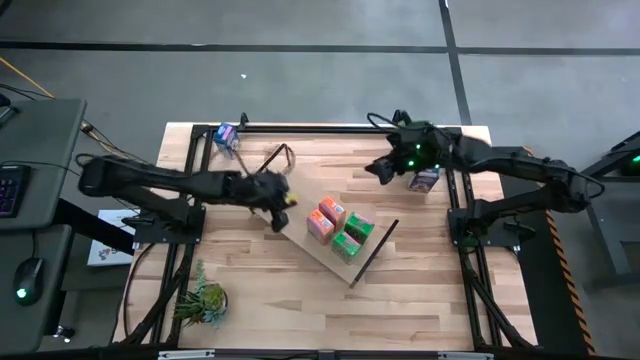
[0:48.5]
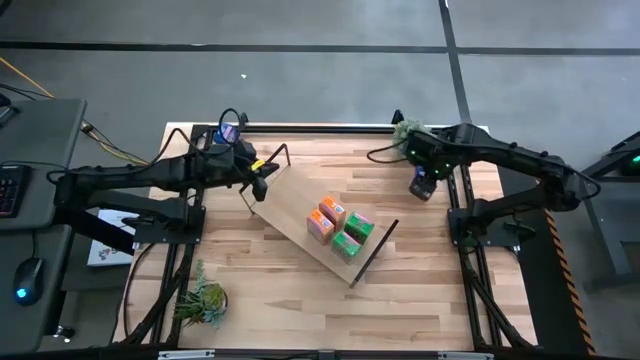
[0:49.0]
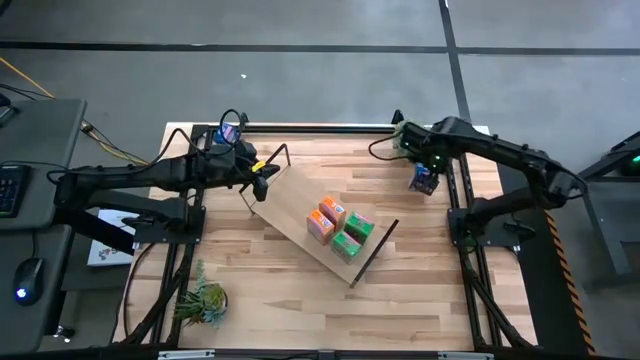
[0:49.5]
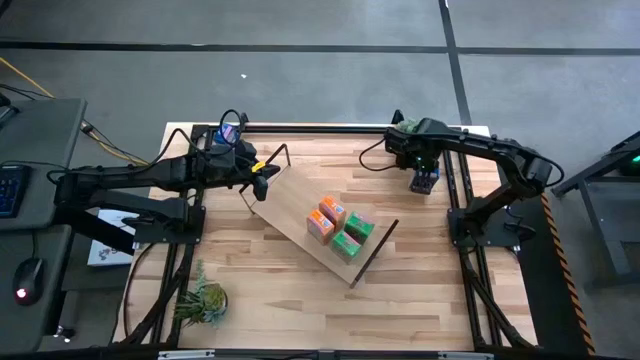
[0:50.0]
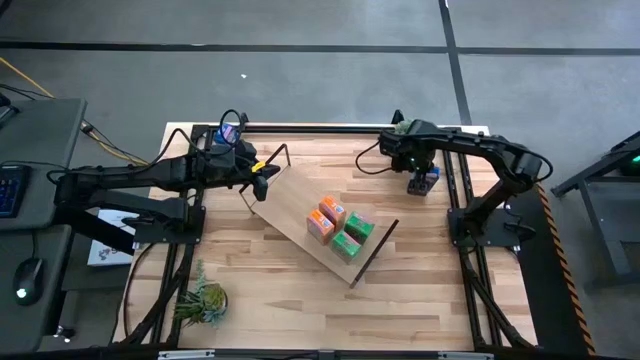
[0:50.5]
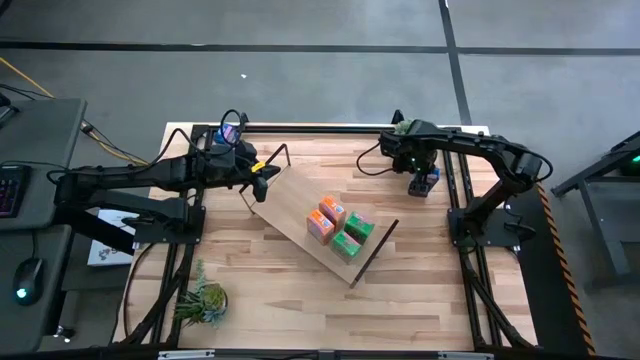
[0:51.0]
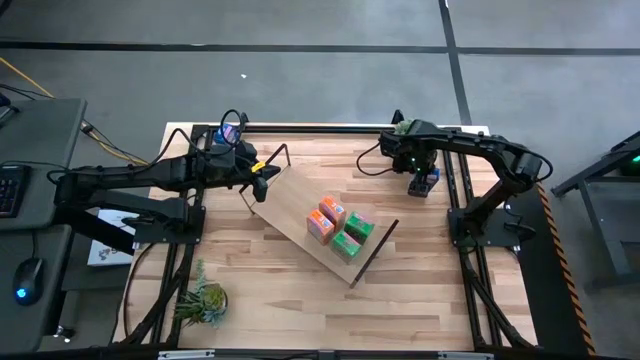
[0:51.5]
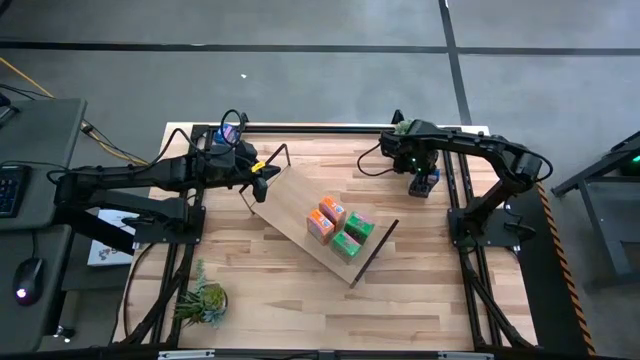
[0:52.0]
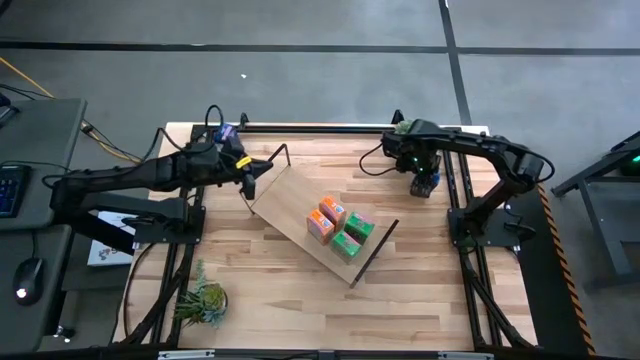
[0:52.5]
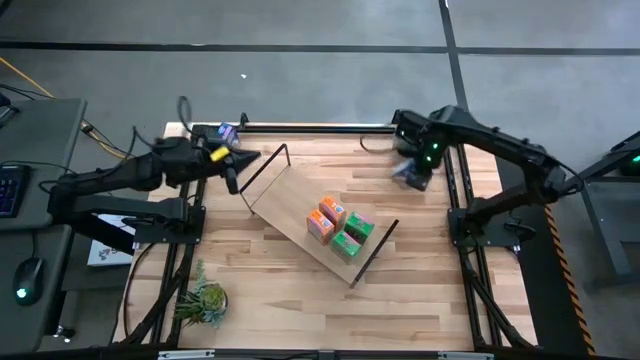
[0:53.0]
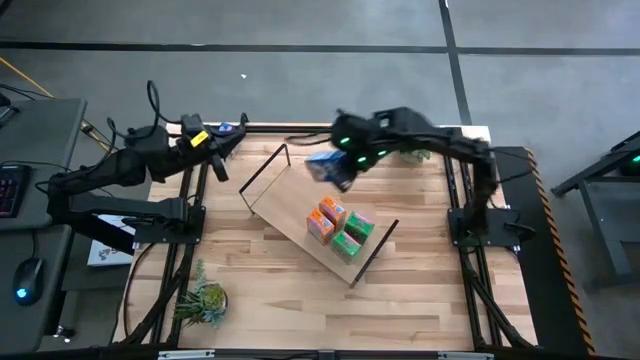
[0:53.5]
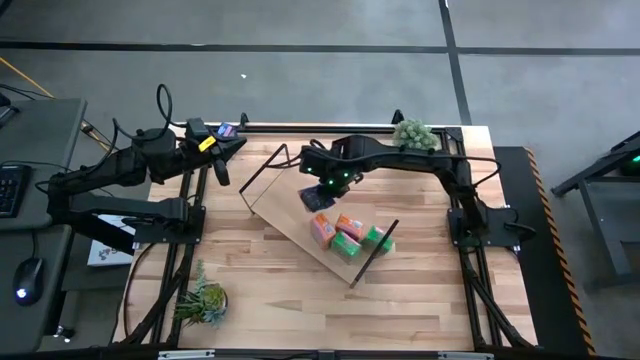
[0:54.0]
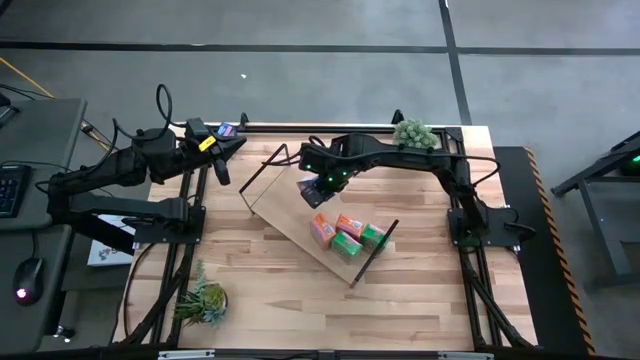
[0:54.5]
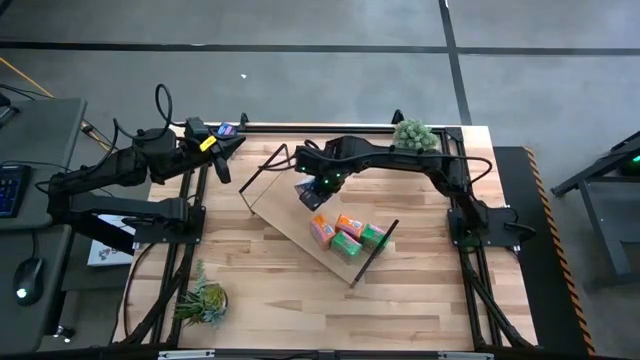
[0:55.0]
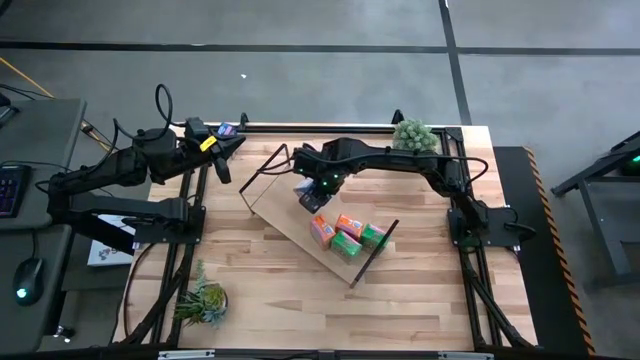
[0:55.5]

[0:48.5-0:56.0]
Task: Stack cereal on shelf
Put the right blue cereal box on the shelf

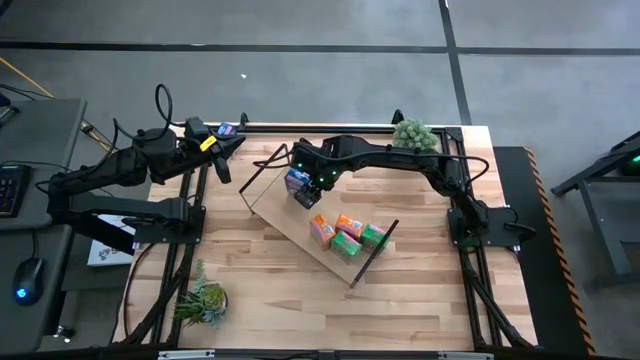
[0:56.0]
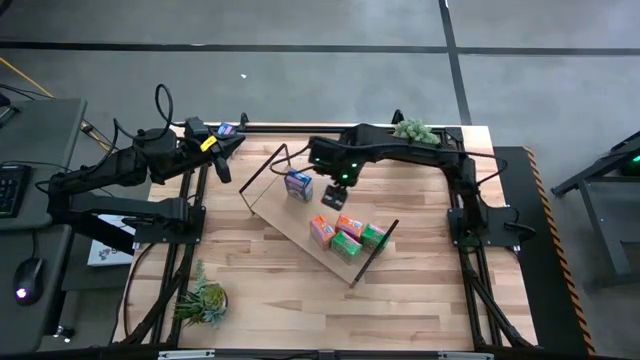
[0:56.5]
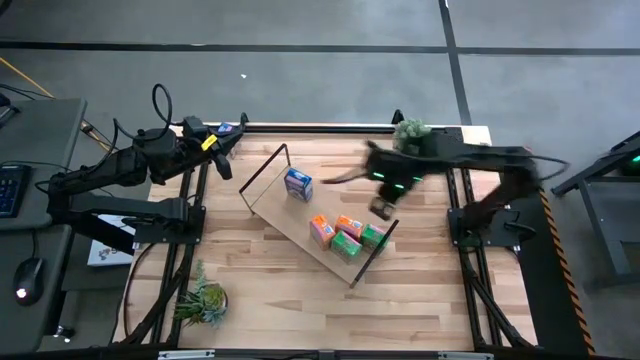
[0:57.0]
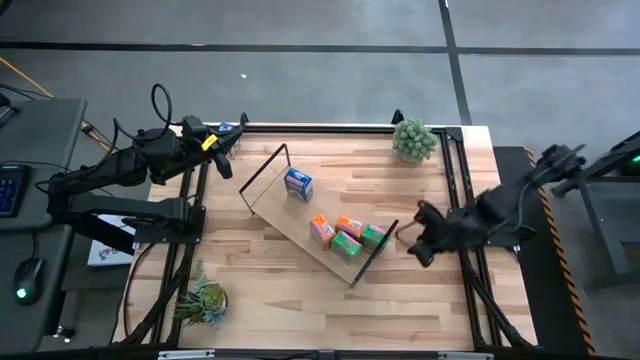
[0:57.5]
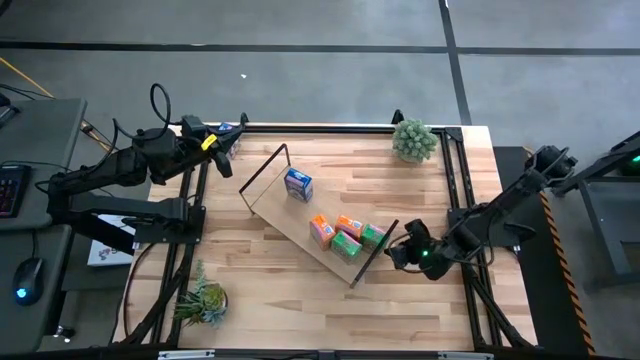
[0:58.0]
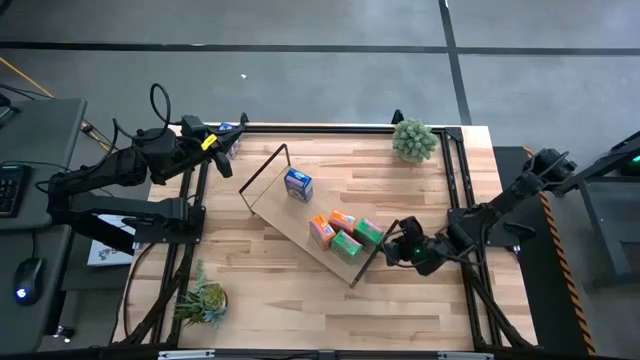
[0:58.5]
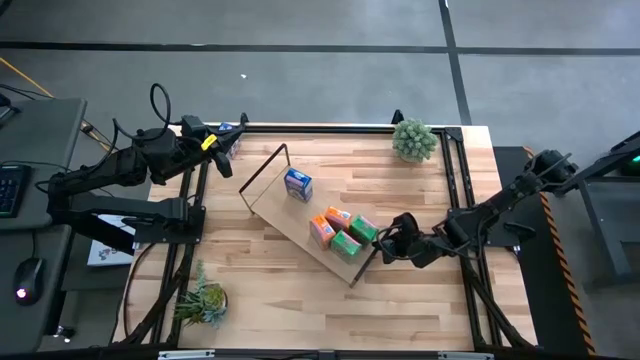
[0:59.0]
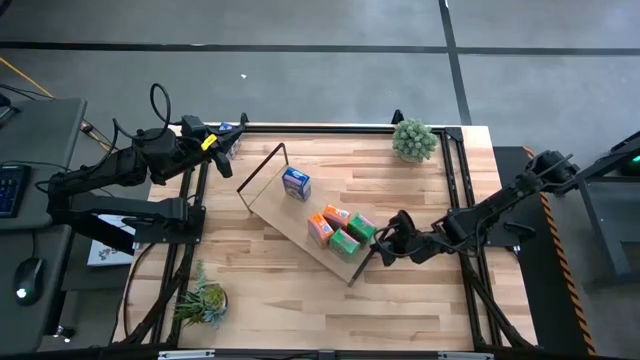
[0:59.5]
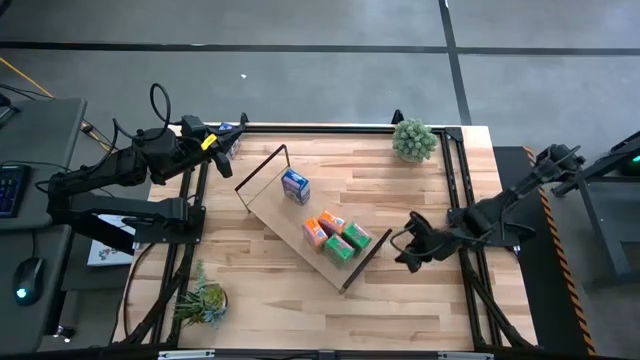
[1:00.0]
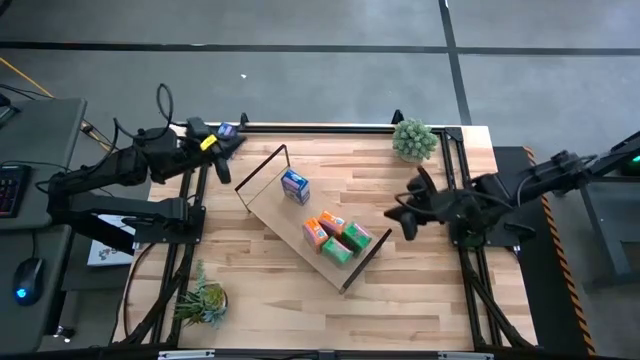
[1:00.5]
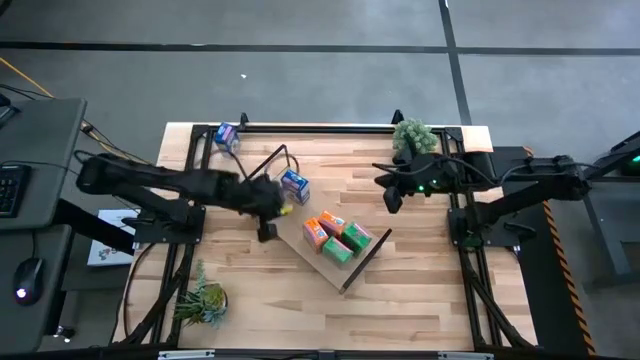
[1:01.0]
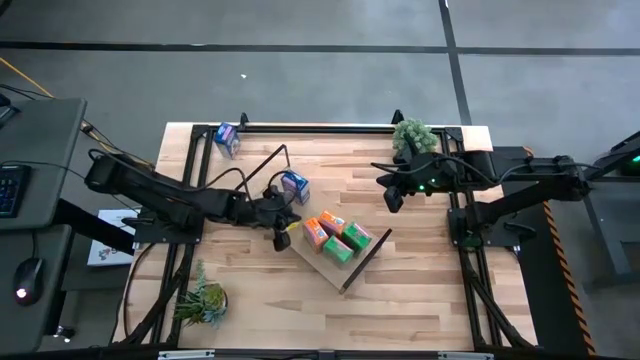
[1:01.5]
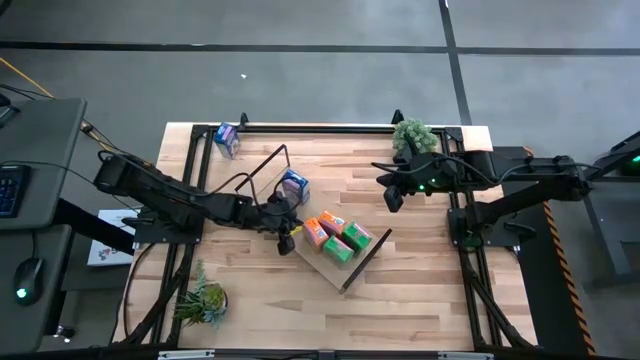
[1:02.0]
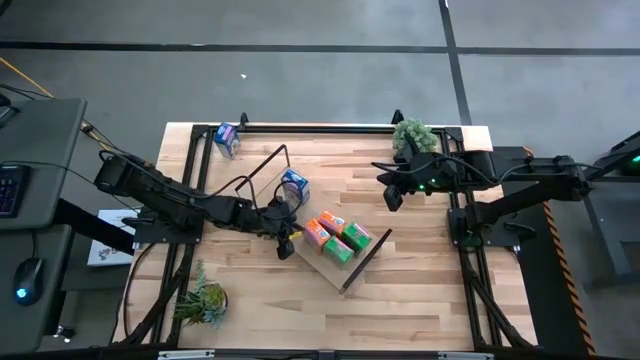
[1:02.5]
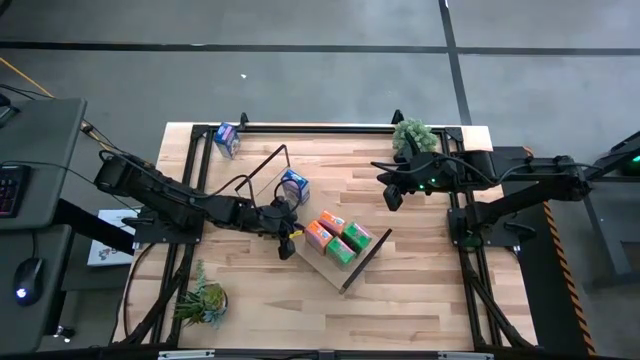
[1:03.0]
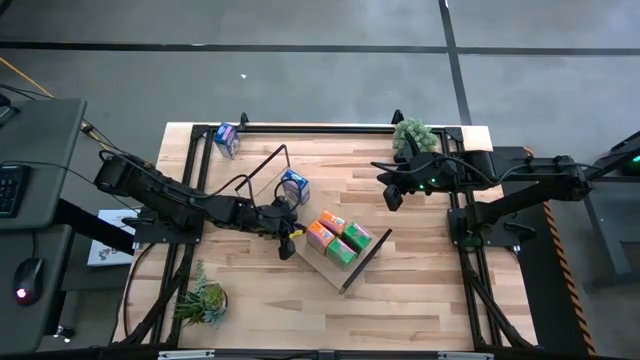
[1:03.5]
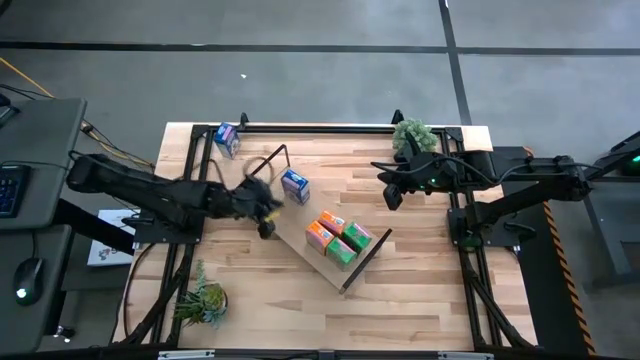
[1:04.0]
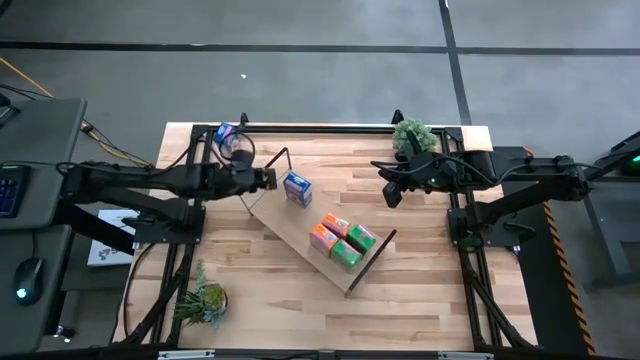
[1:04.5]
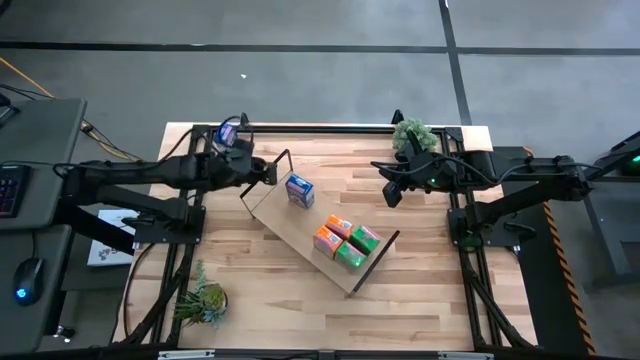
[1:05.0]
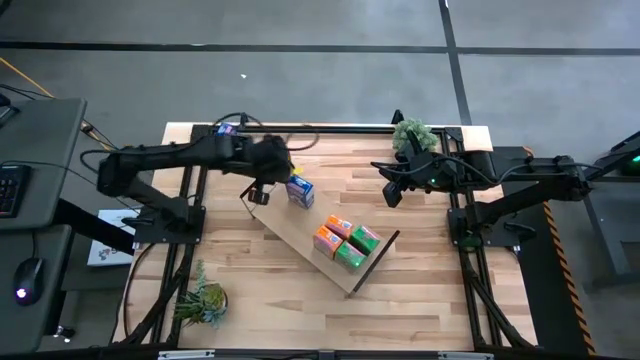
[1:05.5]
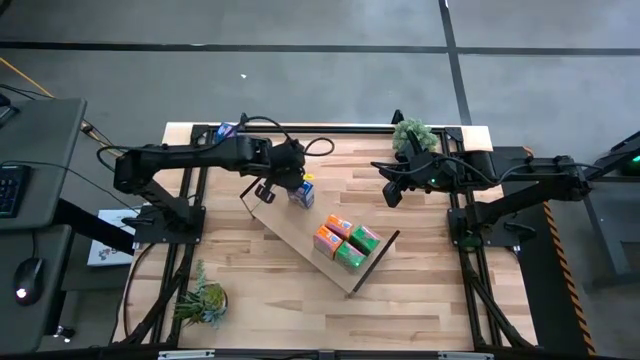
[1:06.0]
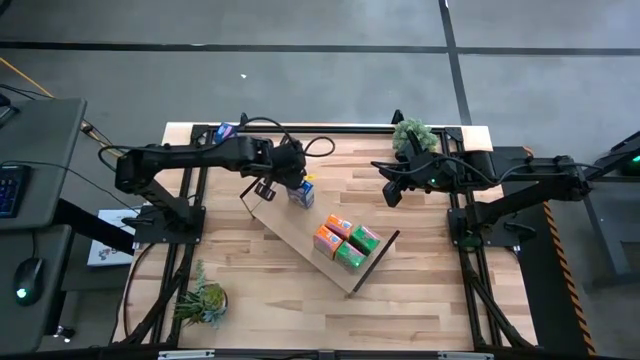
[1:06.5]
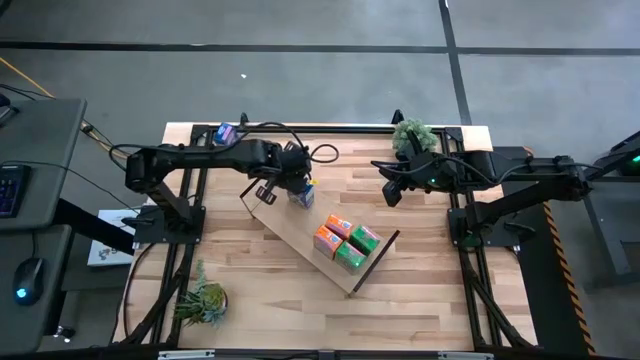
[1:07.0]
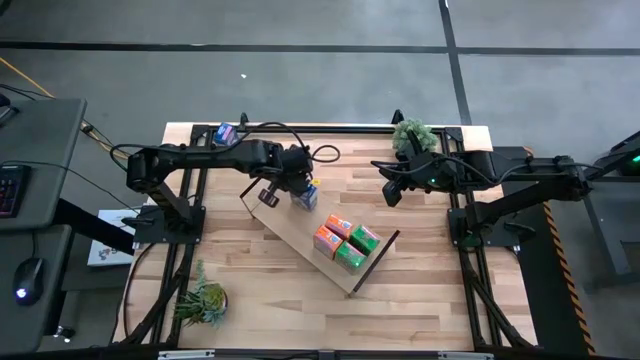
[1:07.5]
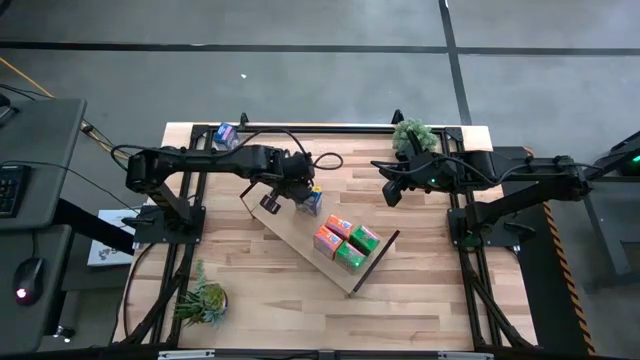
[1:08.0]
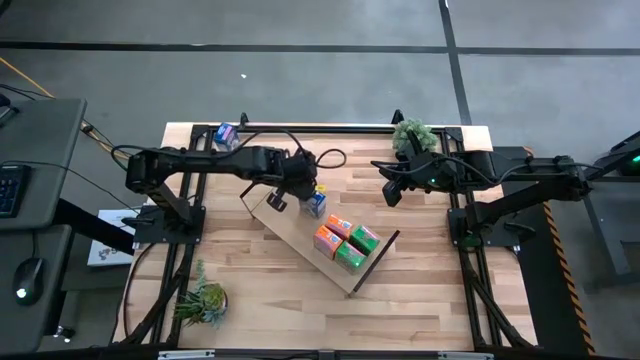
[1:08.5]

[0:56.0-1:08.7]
Adjust the cereal boxes on the shelf

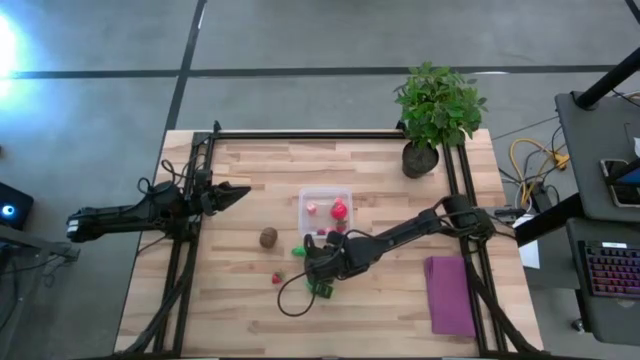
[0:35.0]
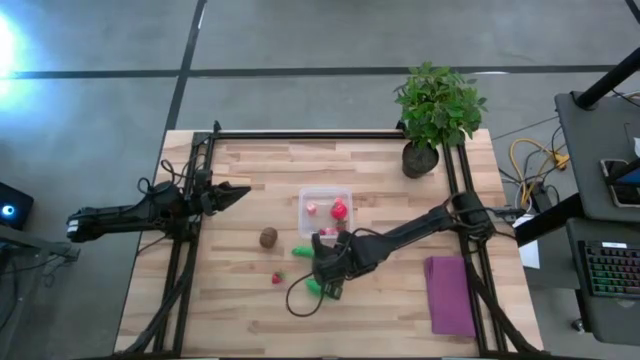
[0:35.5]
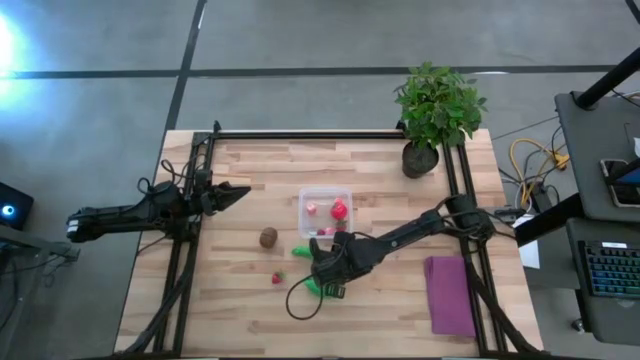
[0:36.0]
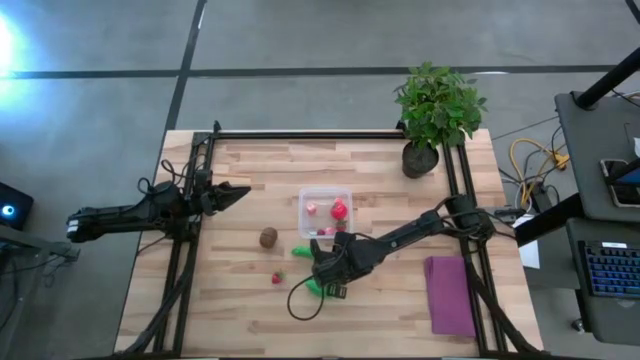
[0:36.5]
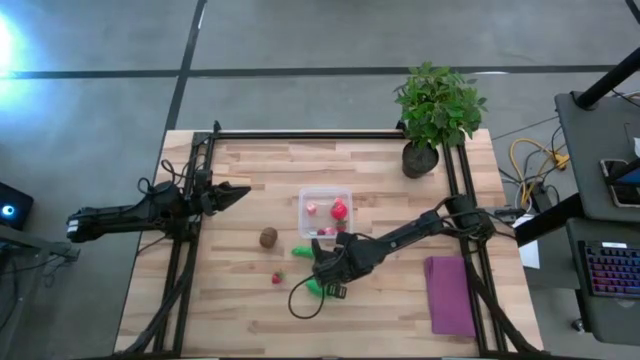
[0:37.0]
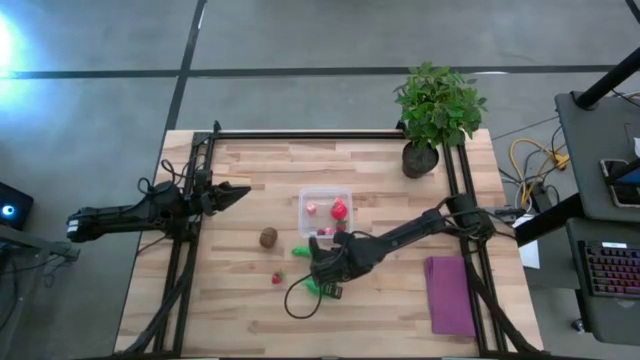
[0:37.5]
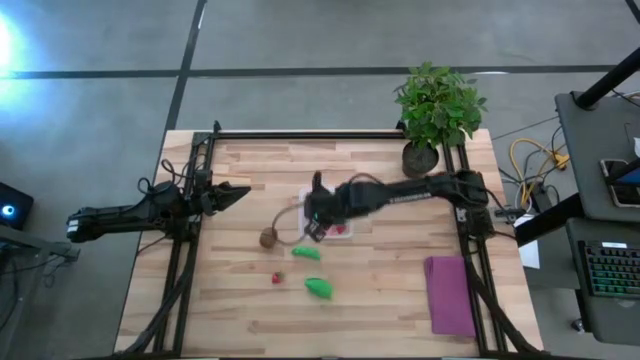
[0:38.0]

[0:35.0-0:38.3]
Task: Pick and placing Produce into tupperware
Put the red cherry into the transparent bin
